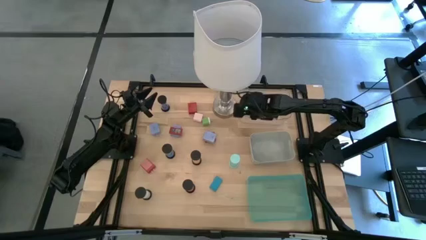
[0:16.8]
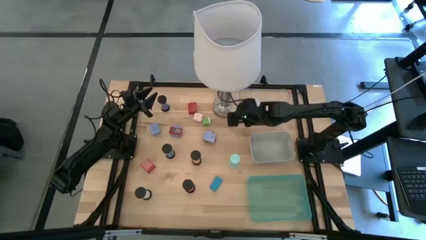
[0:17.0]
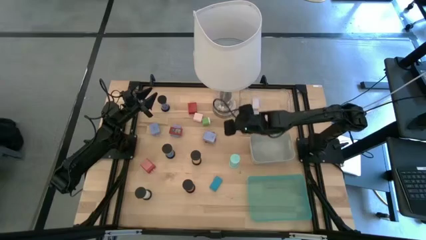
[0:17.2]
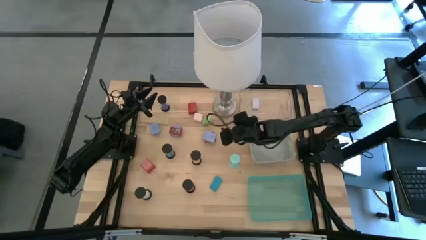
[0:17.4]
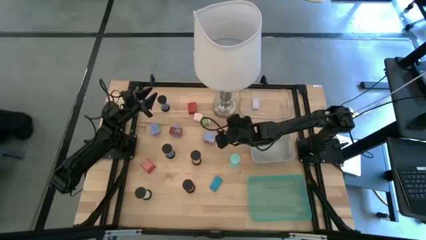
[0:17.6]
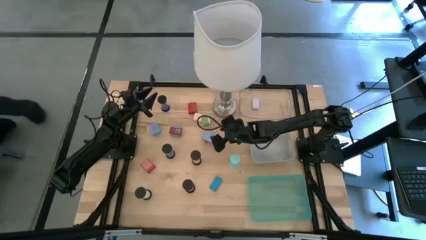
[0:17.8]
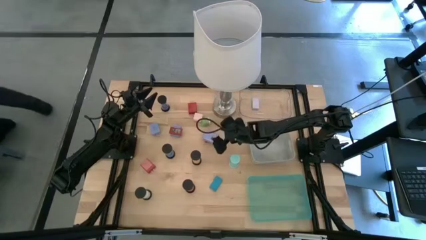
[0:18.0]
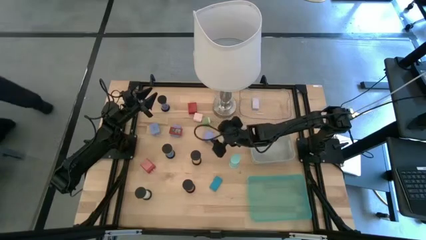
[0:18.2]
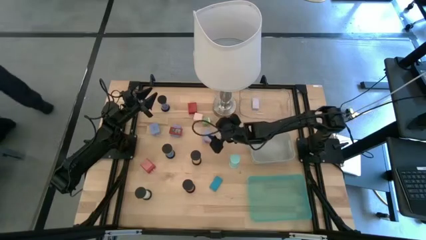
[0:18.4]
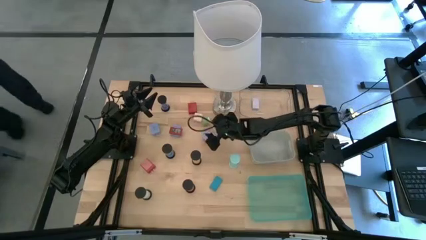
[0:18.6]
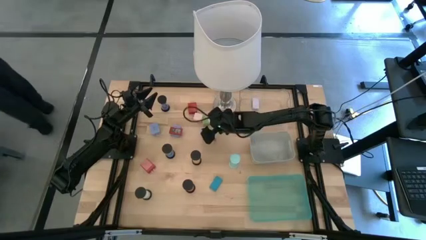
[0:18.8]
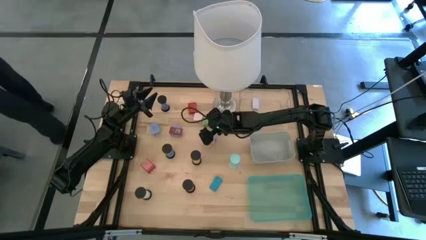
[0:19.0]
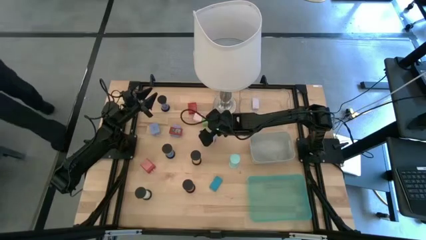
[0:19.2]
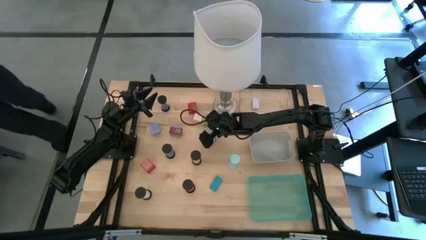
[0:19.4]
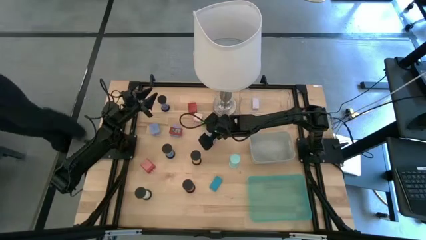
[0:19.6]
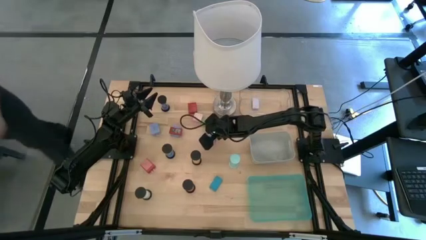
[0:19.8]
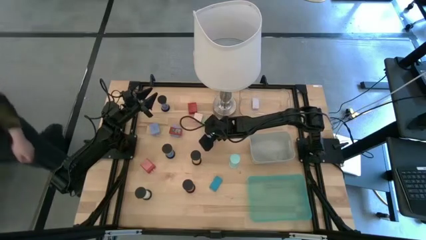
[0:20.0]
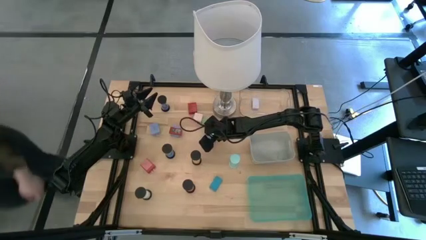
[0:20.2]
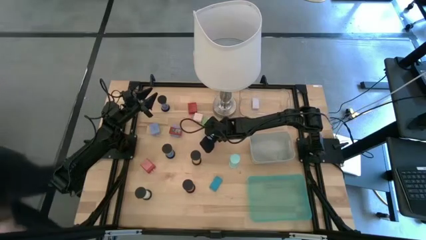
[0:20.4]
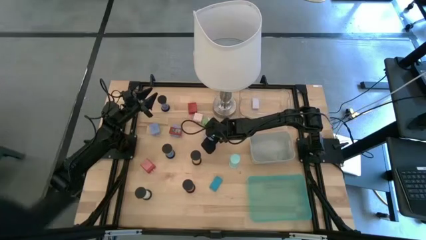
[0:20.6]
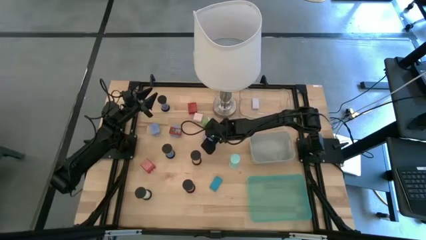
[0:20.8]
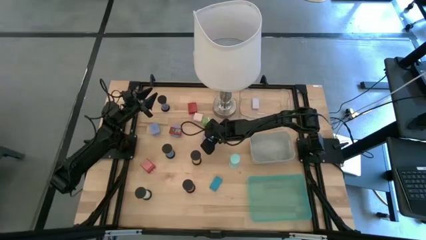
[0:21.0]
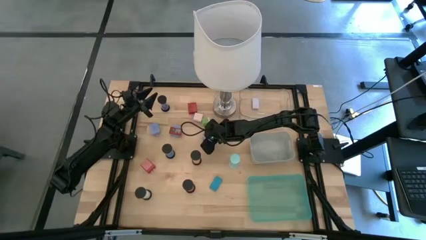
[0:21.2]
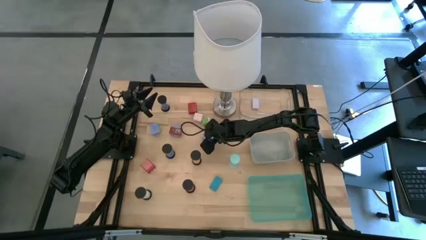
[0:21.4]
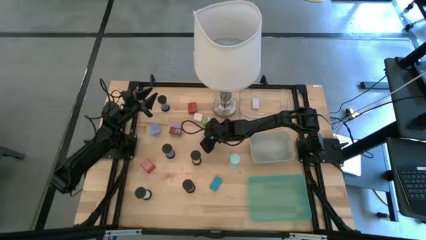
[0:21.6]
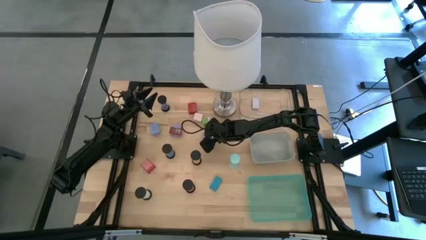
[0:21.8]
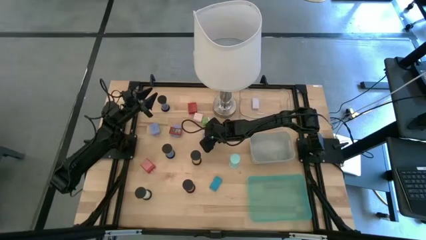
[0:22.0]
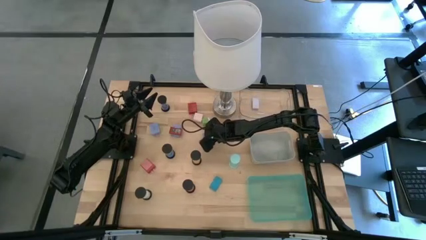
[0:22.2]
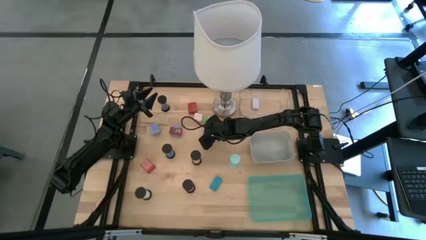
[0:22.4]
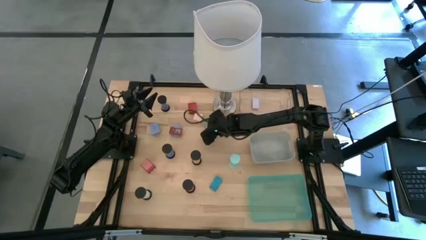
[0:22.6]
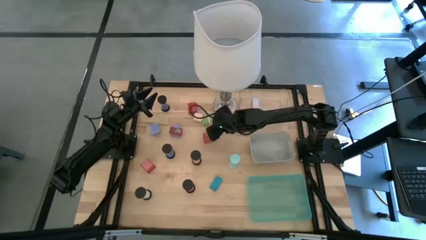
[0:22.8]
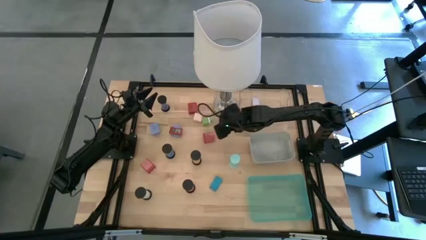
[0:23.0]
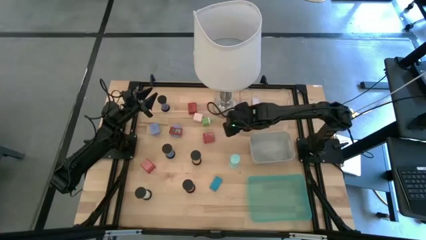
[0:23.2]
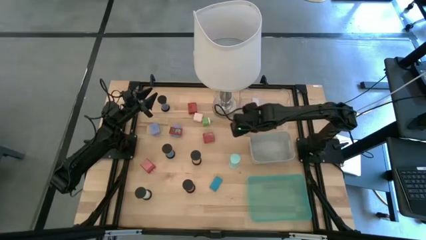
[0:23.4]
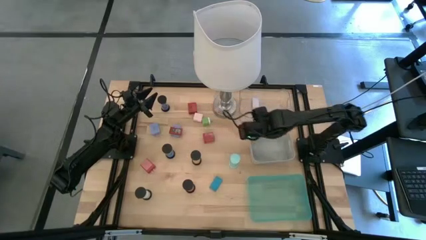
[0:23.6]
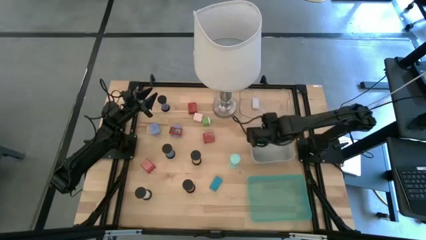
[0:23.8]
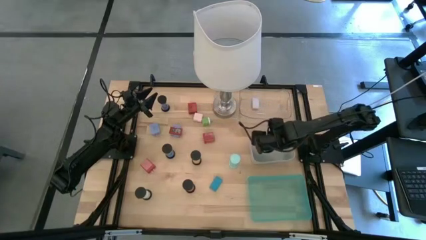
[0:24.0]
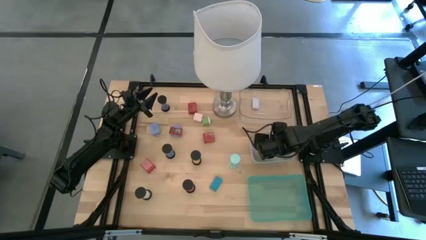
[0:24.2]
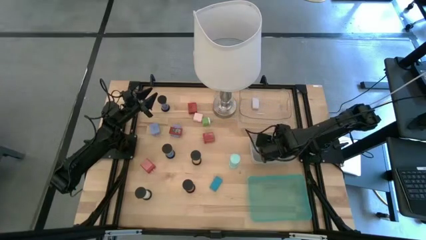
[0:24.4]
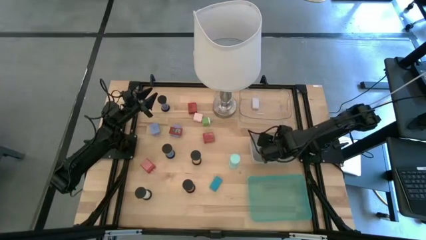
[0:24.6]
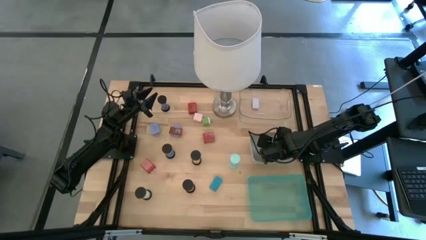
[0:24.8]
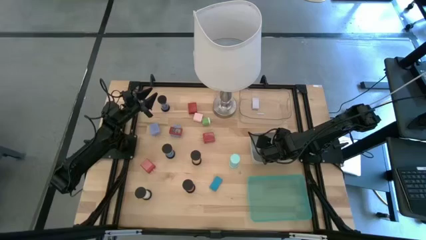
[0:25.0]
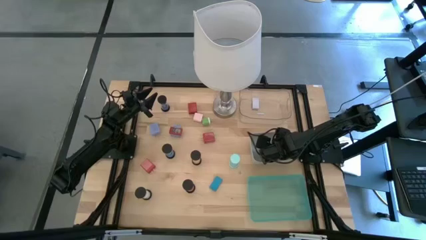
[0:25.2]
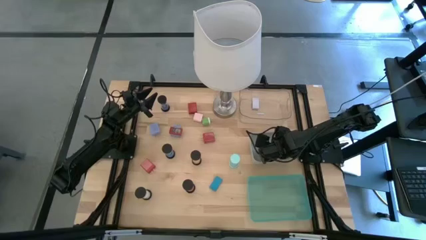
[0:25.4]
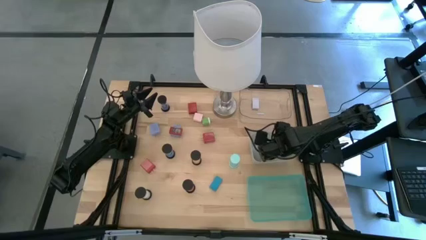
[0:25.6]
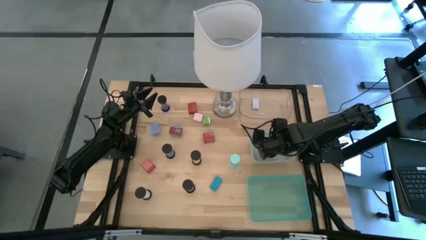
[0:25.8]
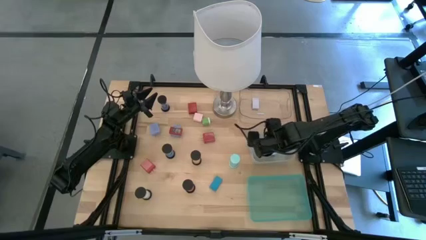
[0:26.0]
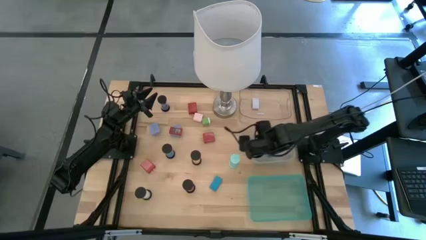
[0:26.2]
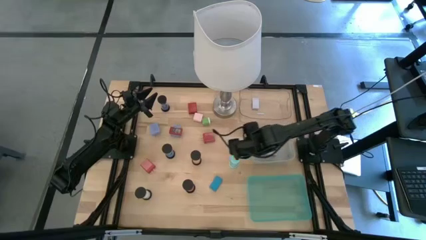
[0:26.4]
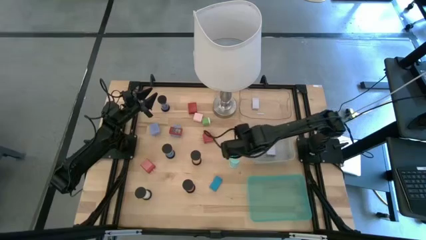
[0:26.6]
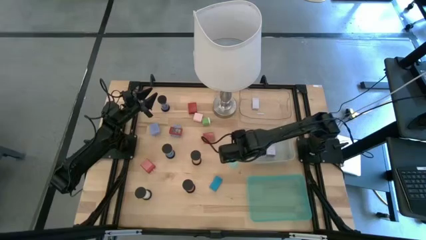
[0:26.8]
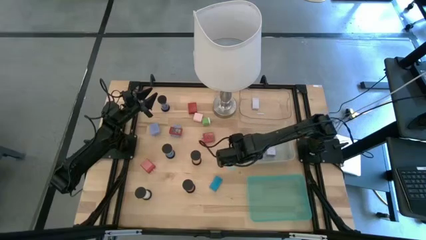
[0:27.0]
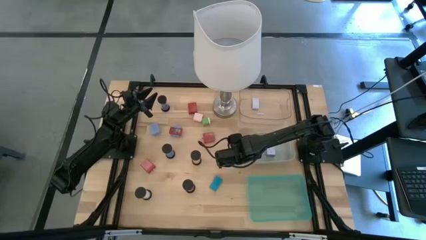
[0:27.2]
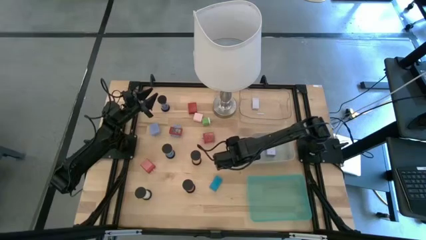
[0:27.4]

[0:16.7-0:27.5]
Task: Pick & Place Office items
Put the purple charger adapter into the gray bin

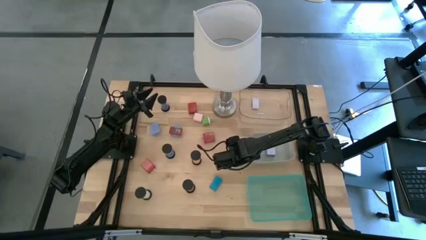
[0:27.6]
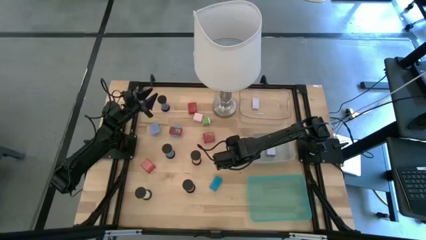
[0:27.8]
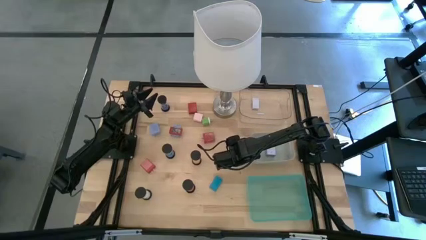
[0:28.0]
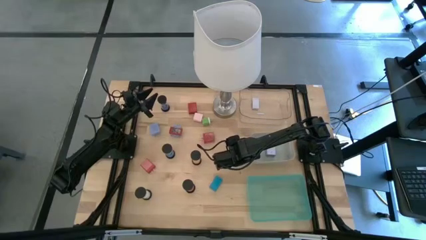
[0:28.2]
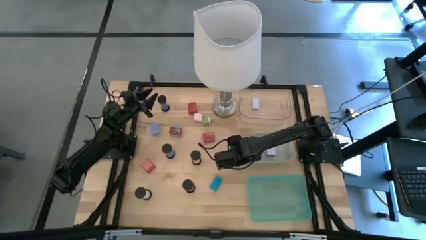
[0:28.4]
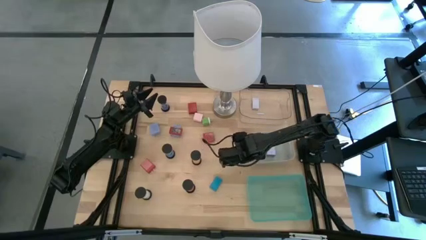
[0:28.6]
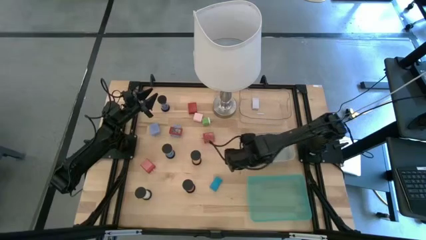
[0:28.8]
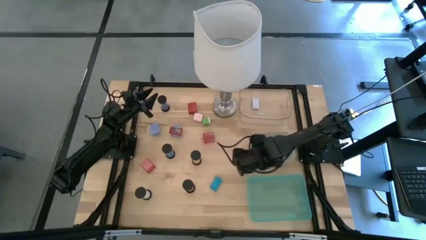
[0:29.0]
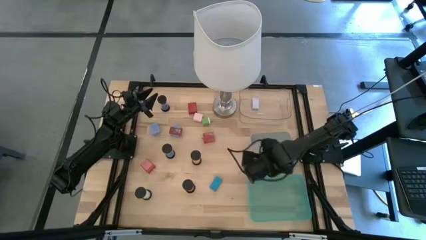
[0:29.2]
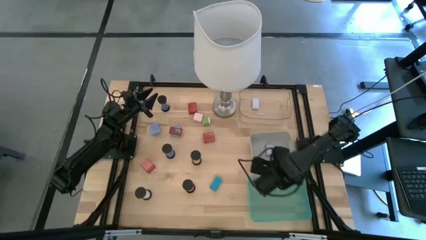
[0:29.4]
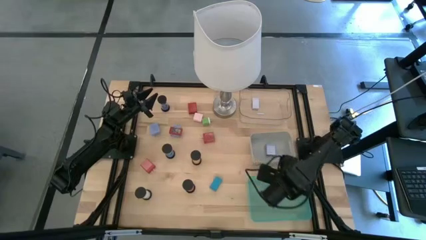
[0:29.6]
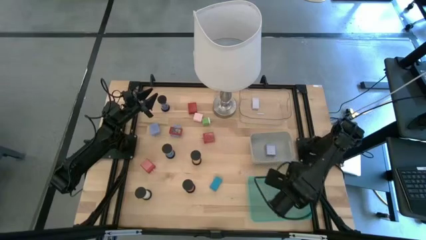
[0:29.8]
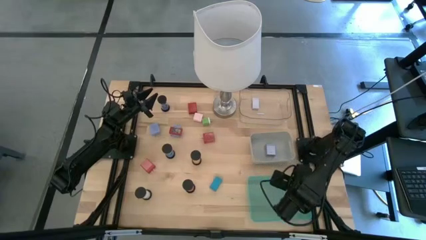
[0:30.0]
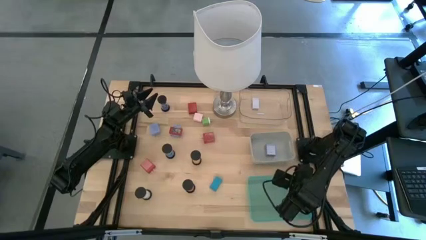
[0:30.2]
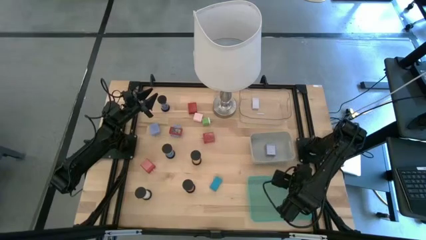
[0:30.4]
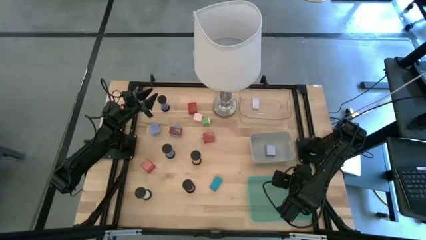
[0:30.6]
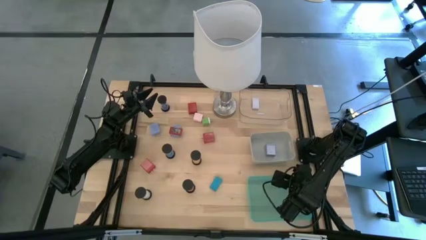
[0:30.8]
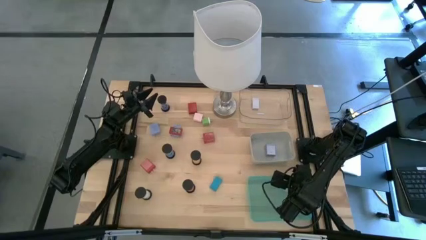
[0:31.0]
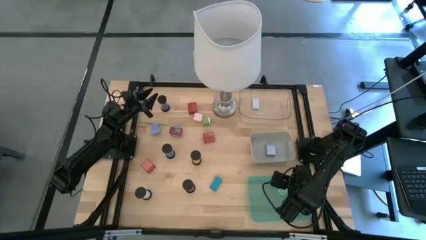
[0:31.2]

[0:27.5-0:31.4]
Put the light blue hourglass into the light blue bin

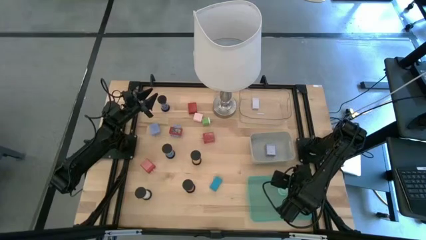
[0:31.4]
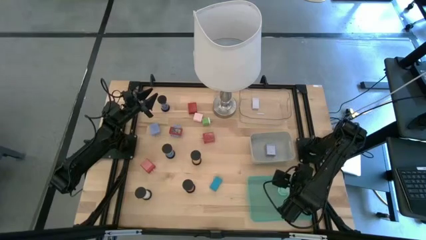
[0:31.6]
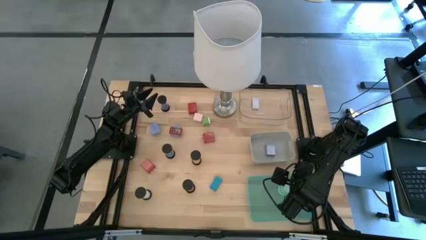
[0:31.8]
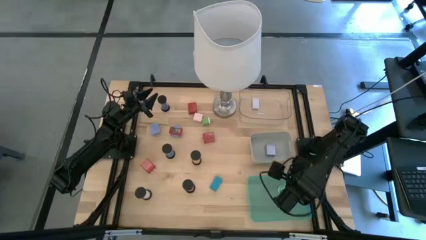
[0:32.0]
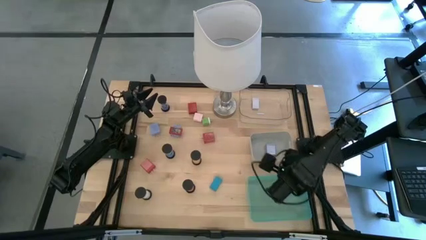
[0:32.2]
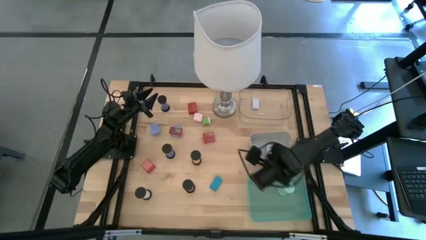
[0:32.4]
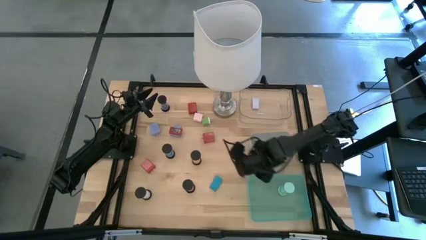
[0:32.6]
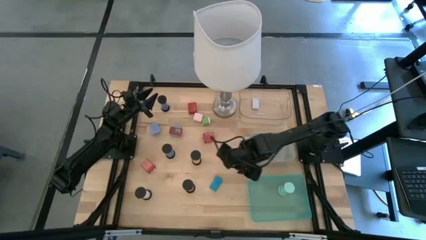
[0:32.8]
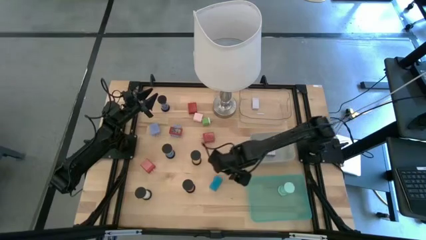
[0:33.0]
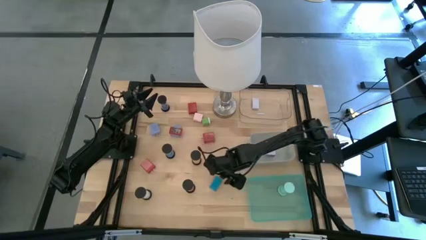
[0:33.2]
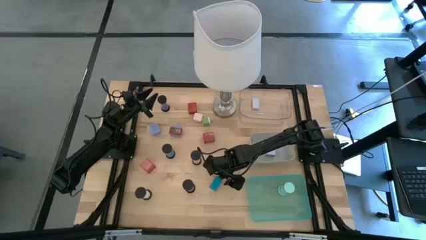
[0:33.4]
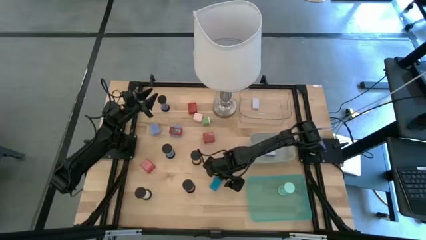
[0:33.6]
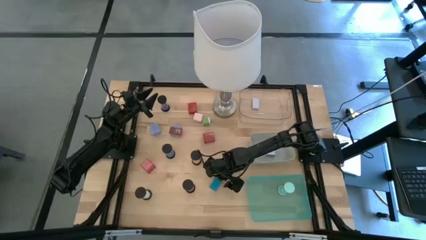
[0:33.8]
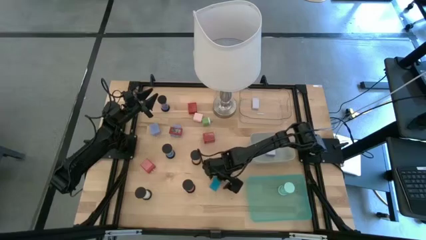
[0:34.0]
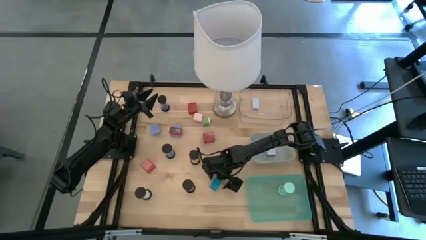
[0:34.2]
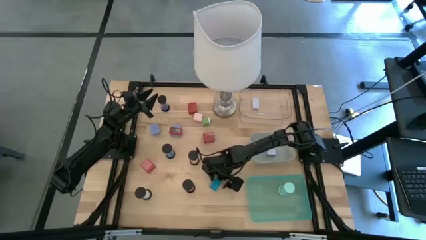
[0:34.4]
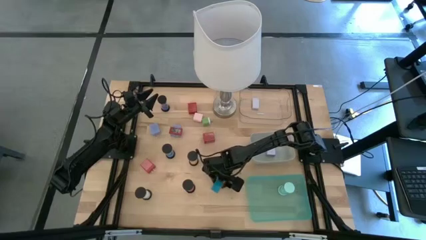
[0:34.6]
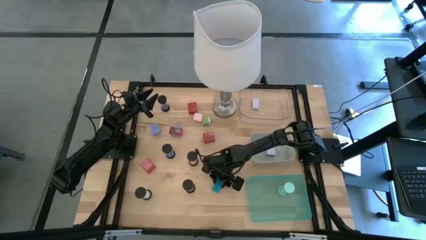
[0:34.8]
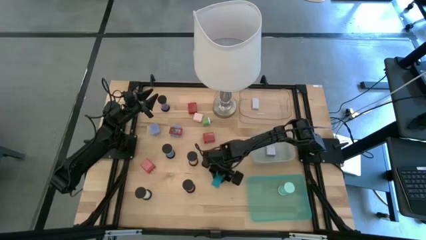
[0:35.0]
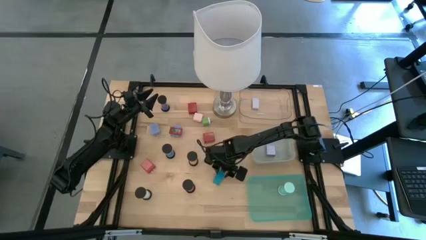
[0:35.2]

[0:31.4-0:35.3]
Put the blue timer into the transparent bin
